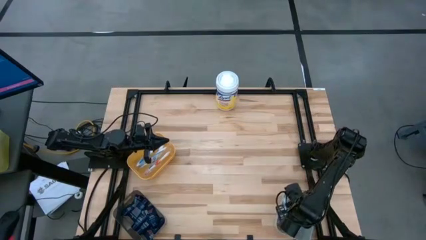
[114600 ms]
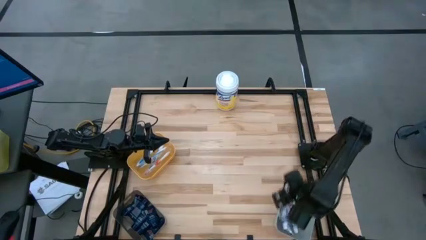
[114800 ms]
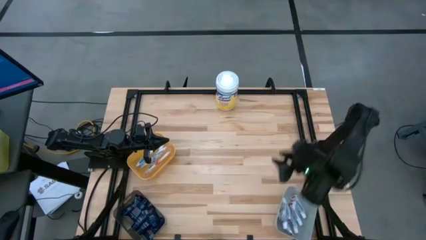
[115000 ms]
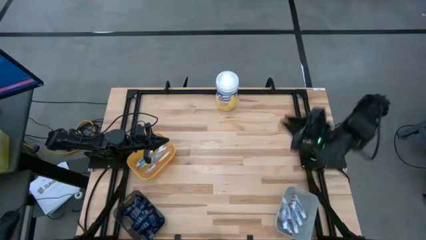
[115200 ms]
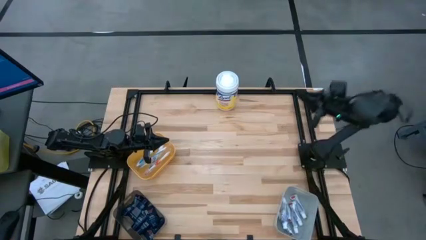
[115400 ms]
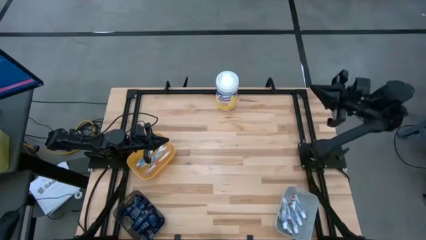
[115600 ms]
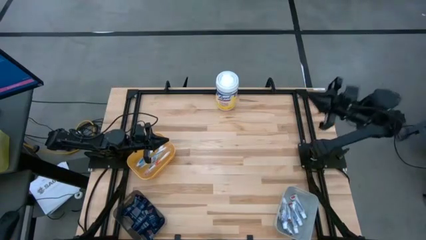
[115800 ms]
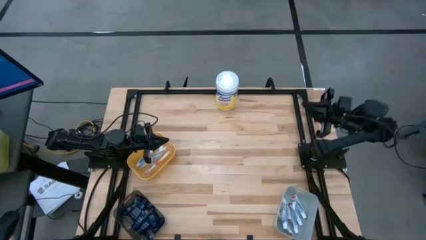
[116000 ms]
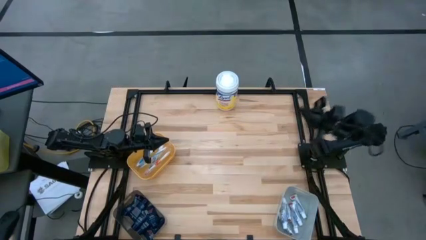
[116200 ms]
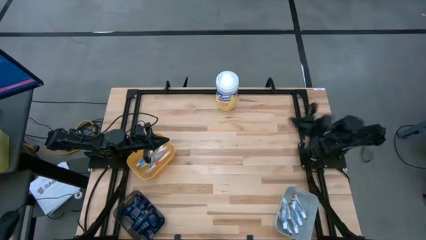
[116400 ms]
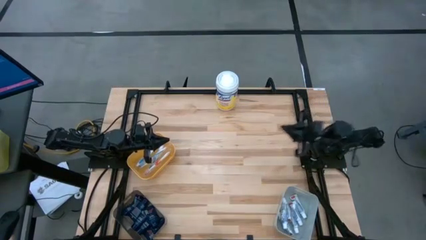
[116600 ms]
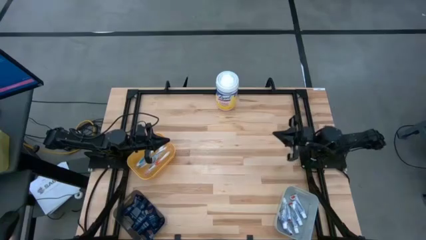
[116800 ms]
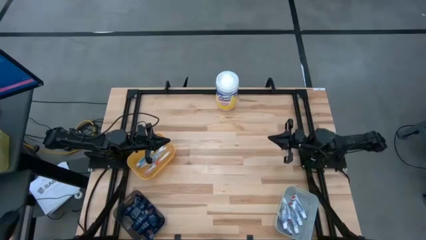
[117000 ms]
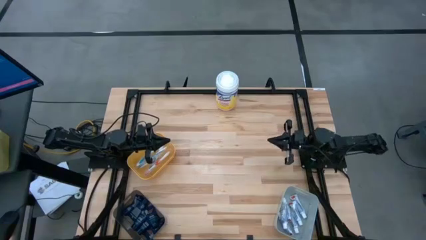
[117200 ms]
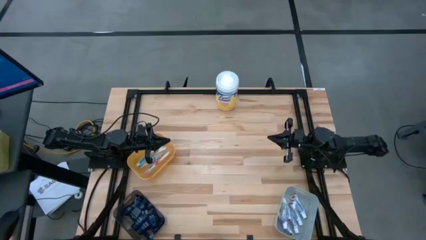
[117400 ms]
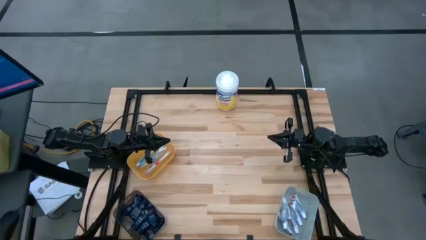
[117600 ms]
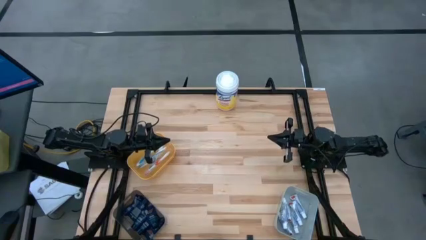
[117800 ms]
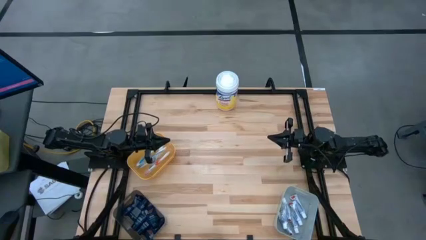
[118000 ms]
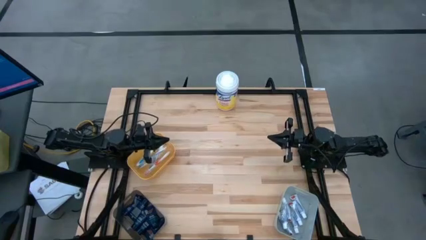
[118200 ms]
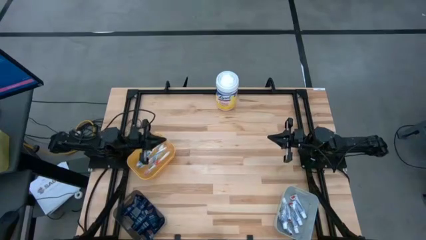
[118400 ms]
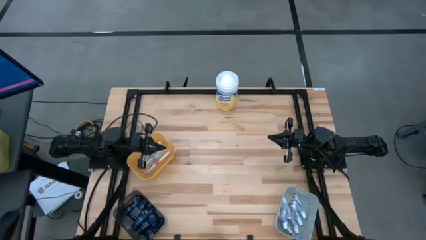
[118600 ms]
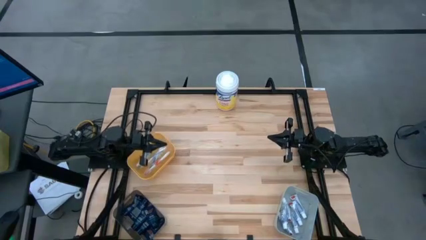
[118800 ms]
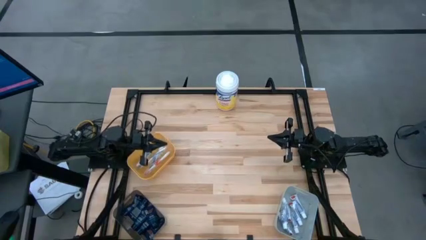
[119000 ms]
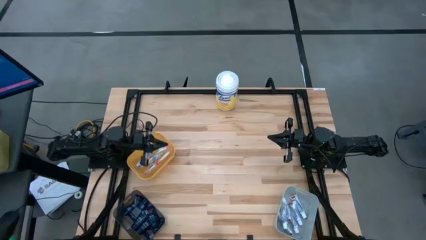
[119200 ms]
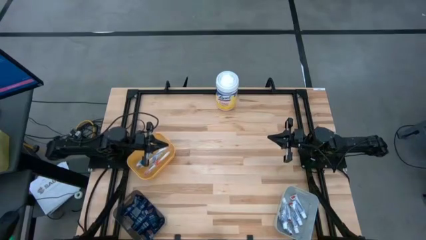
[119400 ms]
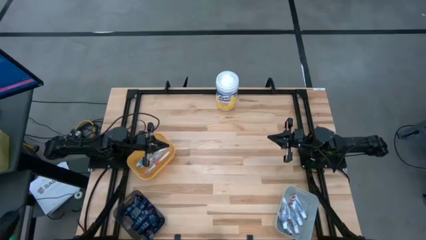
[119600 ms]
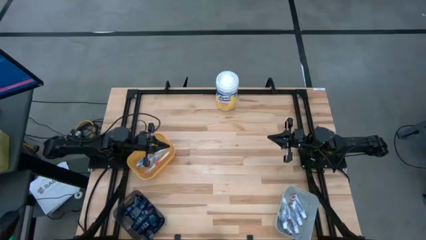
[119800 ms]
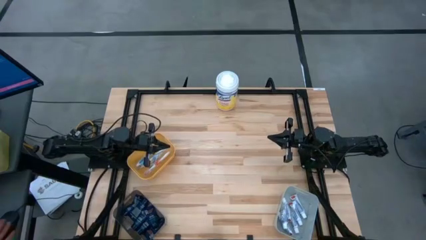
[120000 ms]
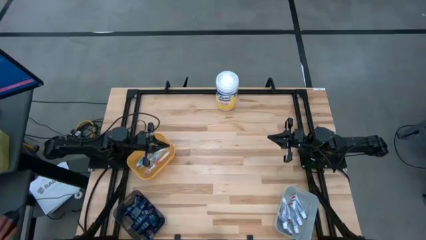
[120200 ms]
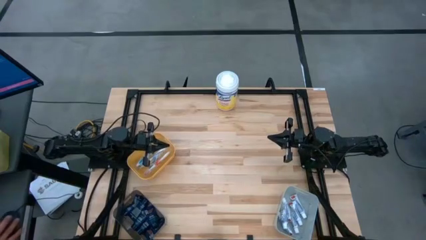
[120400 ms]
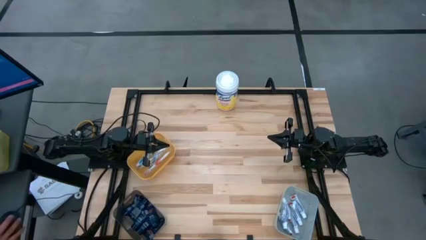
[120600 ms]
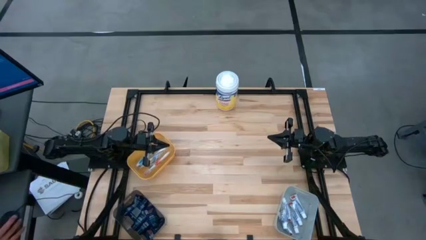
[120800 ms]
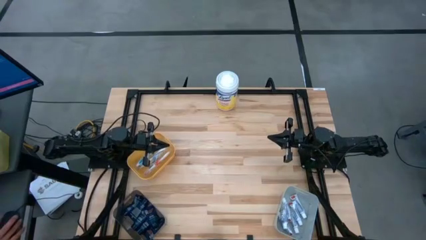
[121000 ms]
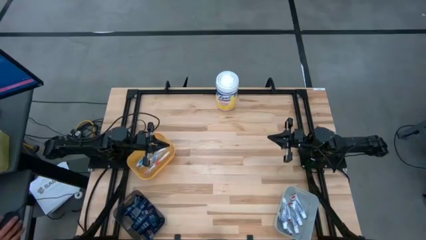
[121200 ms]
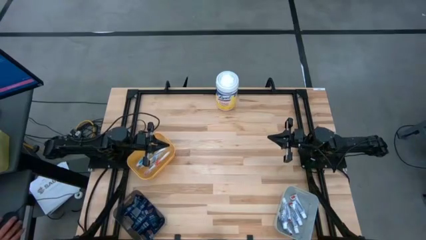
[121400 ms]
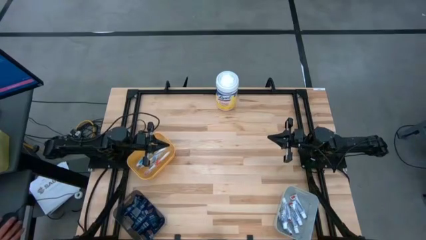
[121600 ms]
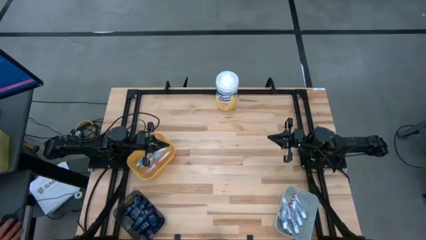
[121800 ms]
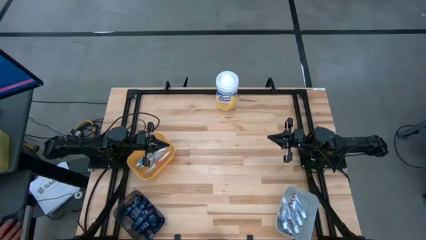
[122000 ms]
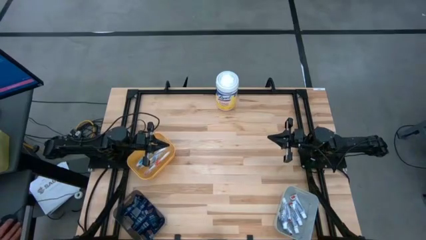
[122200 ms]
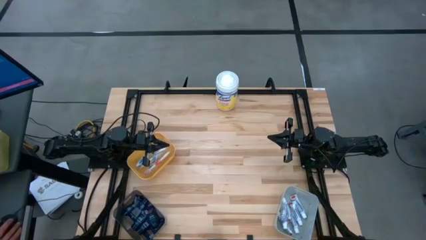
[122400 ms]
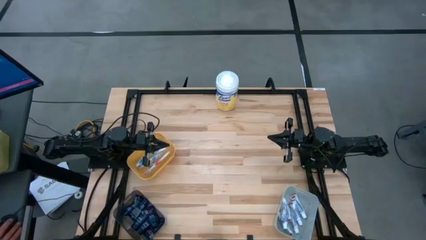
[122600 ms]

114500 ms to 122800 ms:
Task: Pick & Place Travel size toiletries
Return to Home Position
